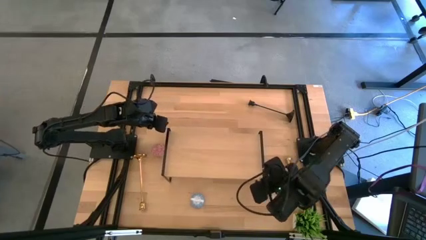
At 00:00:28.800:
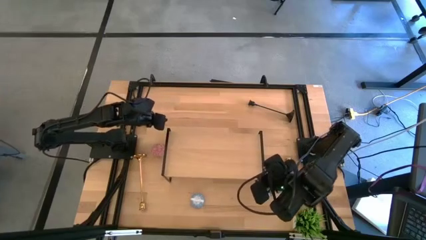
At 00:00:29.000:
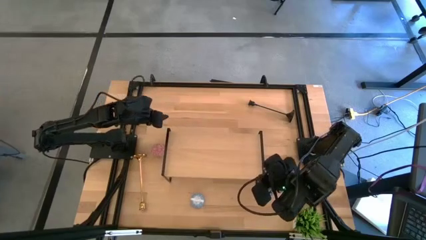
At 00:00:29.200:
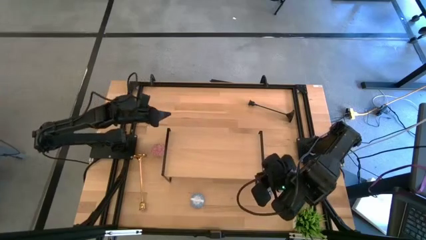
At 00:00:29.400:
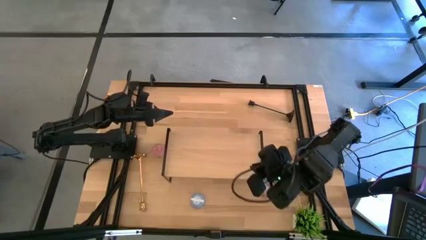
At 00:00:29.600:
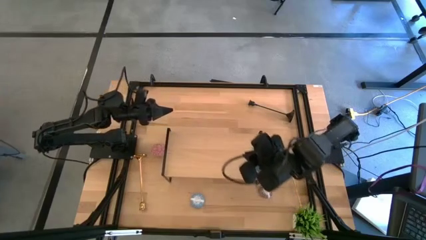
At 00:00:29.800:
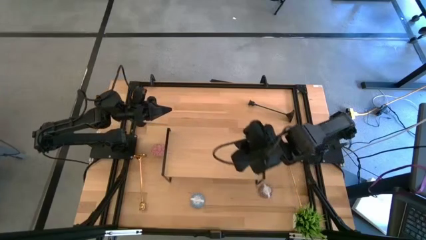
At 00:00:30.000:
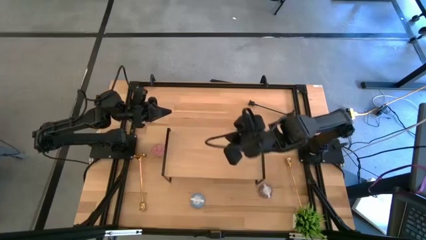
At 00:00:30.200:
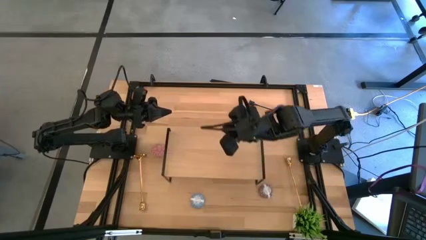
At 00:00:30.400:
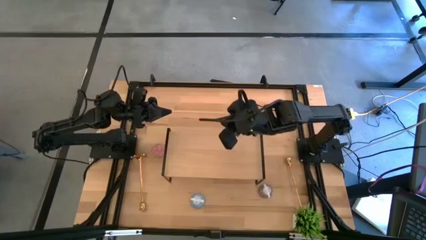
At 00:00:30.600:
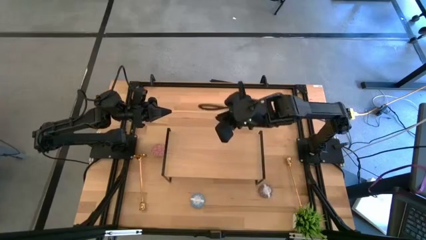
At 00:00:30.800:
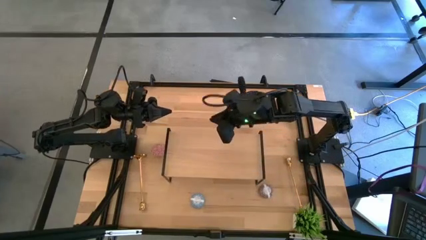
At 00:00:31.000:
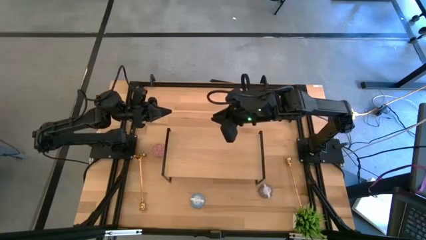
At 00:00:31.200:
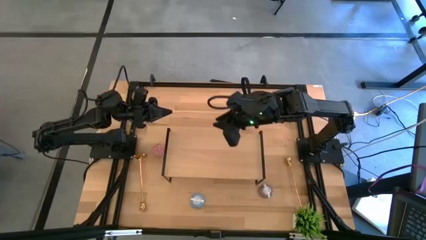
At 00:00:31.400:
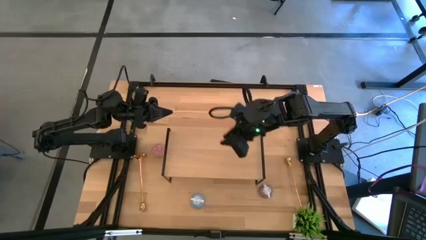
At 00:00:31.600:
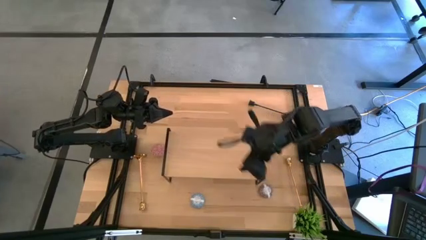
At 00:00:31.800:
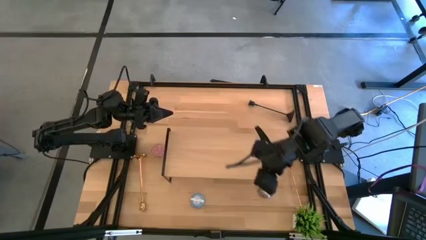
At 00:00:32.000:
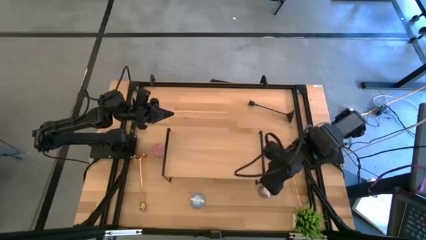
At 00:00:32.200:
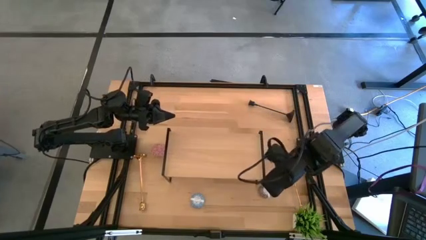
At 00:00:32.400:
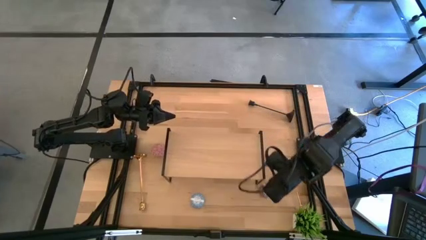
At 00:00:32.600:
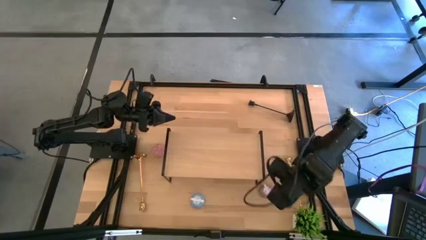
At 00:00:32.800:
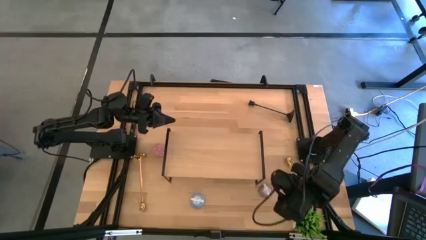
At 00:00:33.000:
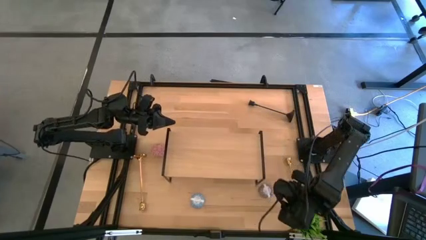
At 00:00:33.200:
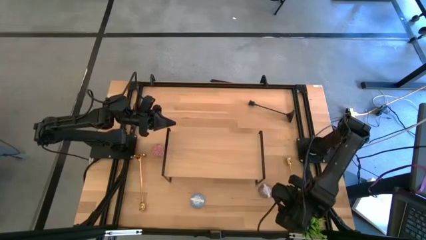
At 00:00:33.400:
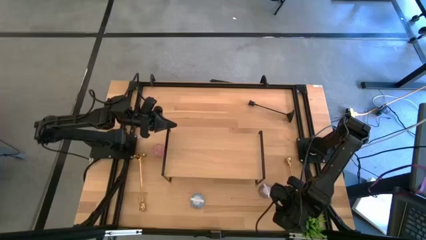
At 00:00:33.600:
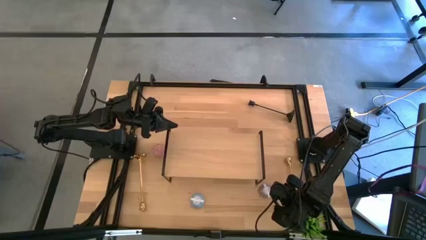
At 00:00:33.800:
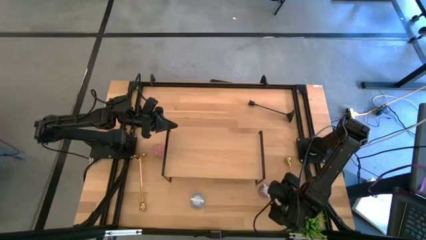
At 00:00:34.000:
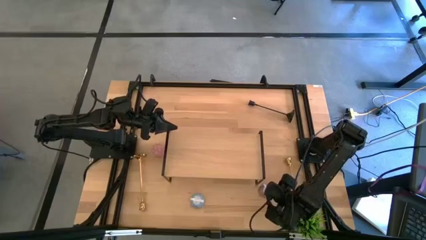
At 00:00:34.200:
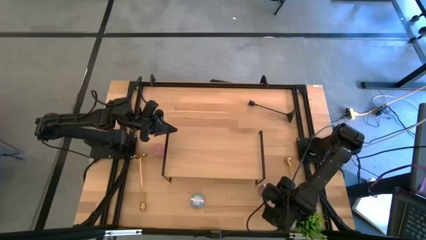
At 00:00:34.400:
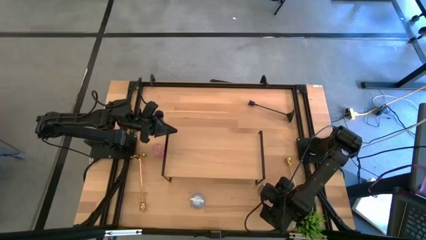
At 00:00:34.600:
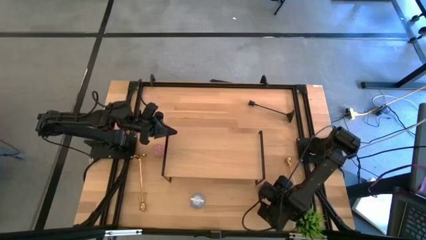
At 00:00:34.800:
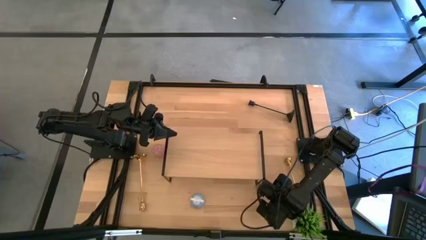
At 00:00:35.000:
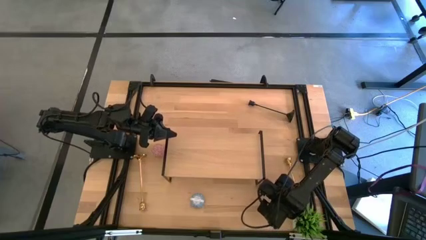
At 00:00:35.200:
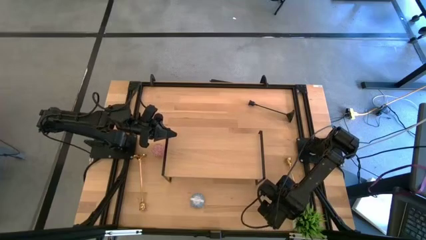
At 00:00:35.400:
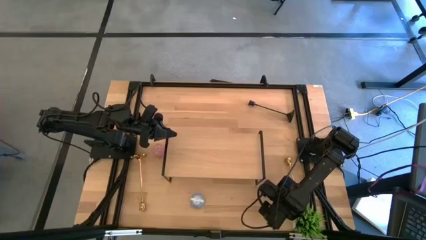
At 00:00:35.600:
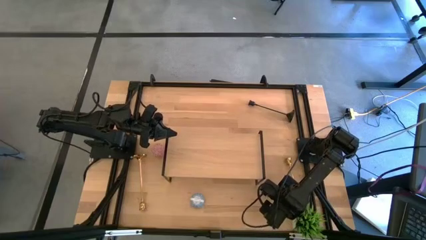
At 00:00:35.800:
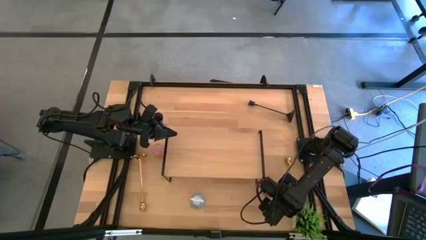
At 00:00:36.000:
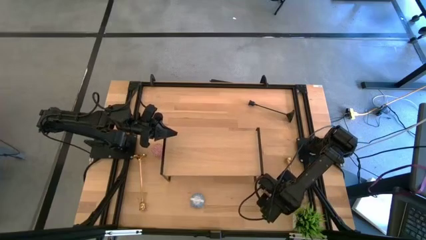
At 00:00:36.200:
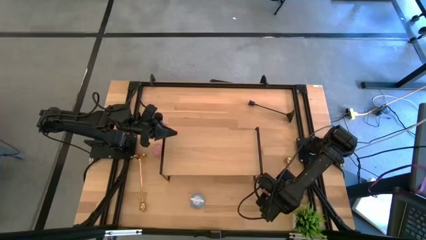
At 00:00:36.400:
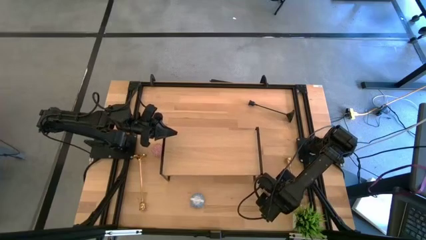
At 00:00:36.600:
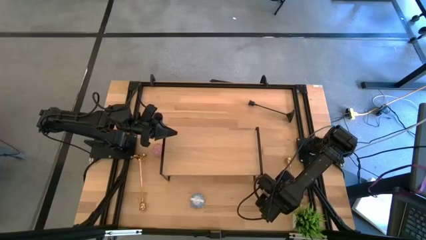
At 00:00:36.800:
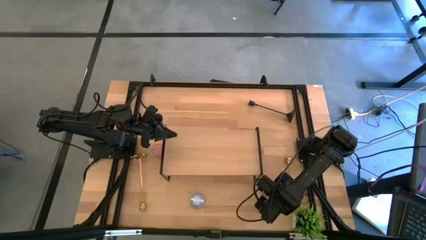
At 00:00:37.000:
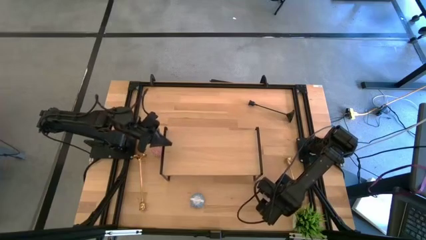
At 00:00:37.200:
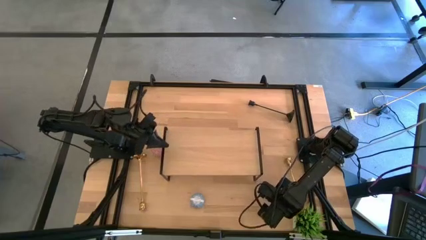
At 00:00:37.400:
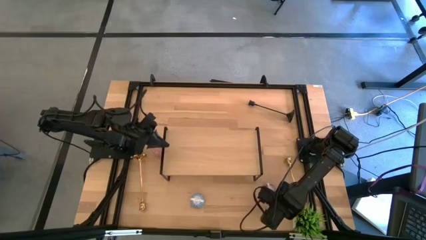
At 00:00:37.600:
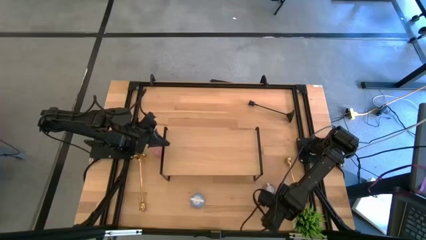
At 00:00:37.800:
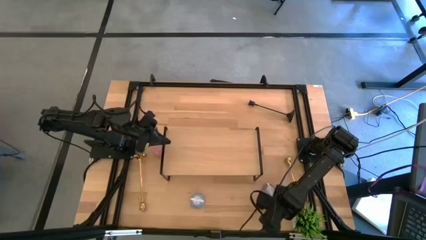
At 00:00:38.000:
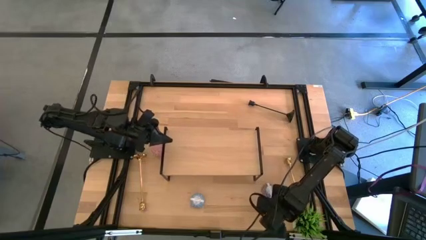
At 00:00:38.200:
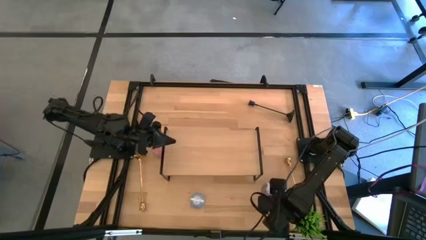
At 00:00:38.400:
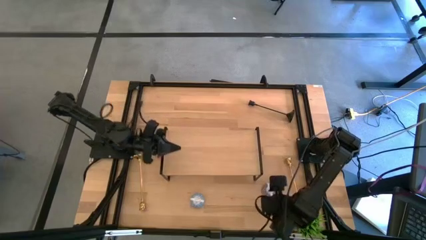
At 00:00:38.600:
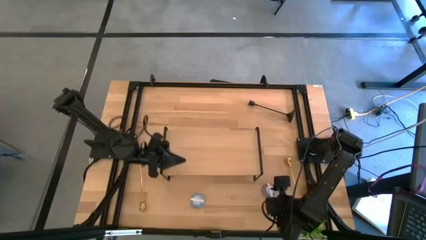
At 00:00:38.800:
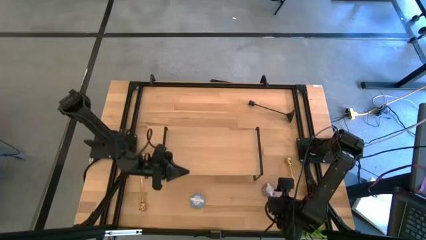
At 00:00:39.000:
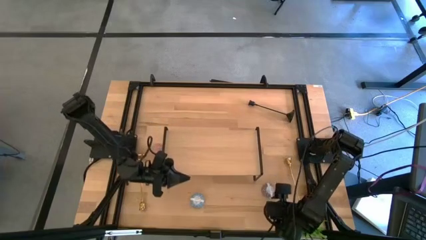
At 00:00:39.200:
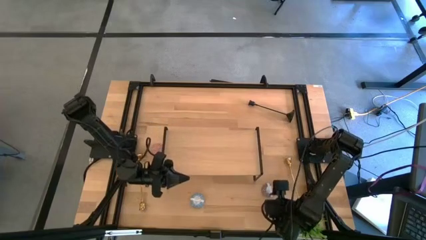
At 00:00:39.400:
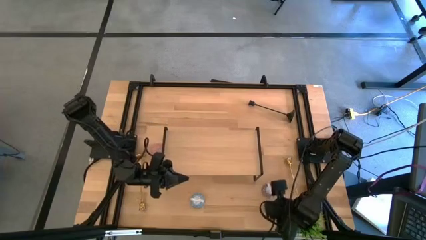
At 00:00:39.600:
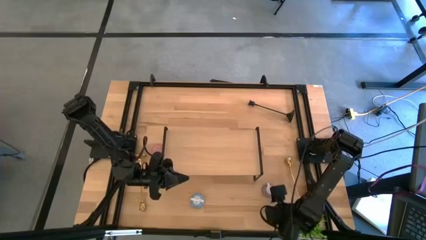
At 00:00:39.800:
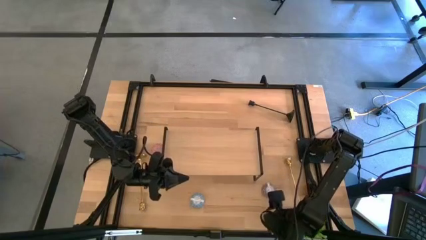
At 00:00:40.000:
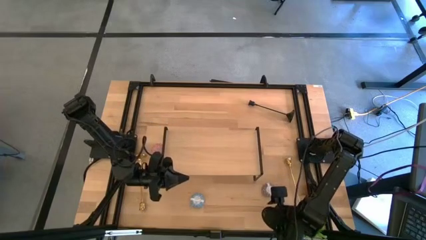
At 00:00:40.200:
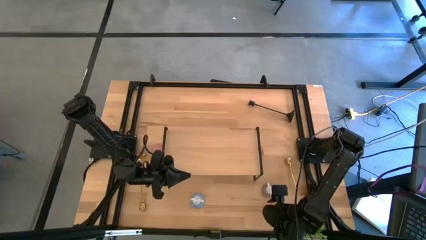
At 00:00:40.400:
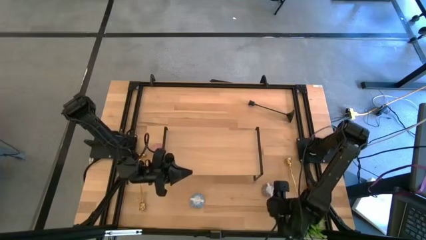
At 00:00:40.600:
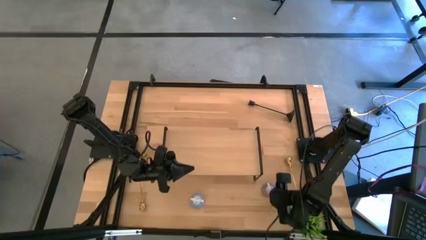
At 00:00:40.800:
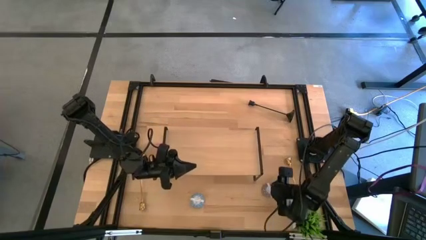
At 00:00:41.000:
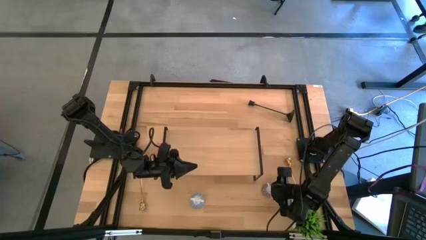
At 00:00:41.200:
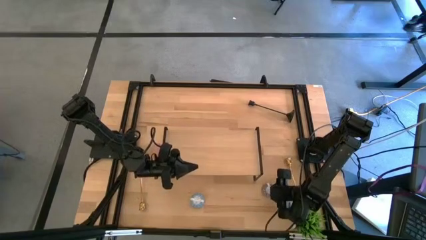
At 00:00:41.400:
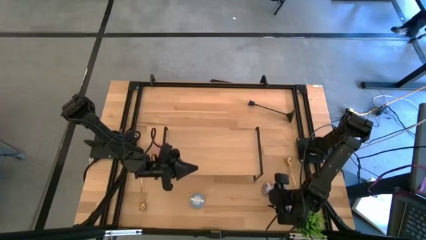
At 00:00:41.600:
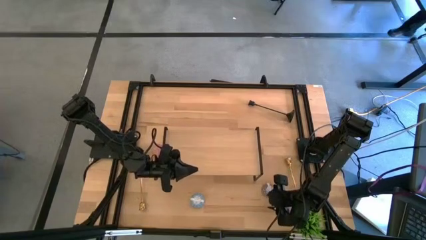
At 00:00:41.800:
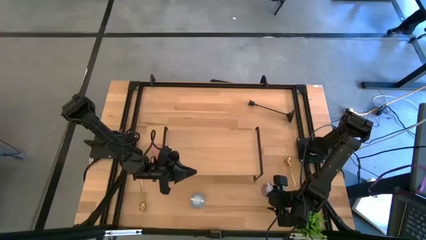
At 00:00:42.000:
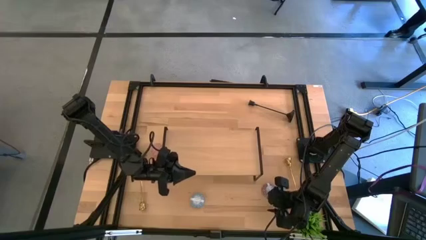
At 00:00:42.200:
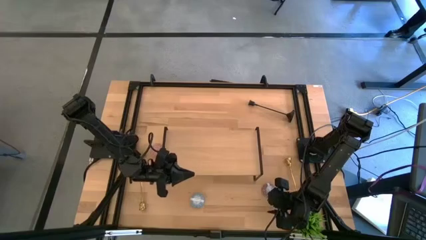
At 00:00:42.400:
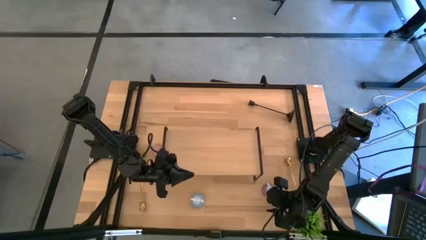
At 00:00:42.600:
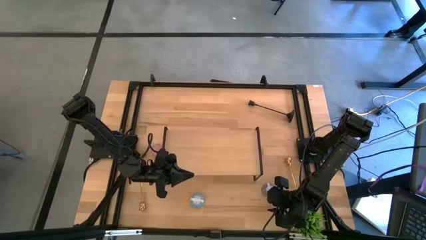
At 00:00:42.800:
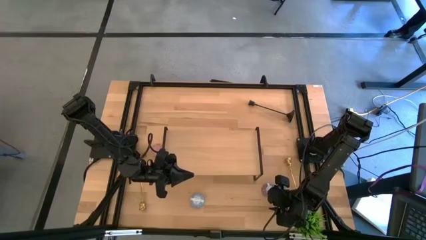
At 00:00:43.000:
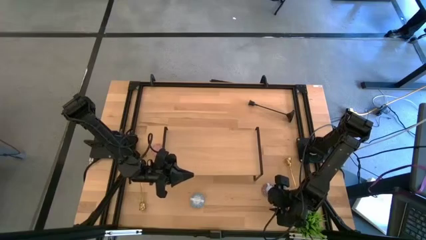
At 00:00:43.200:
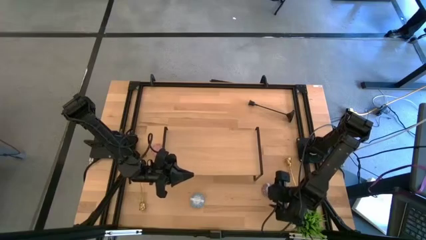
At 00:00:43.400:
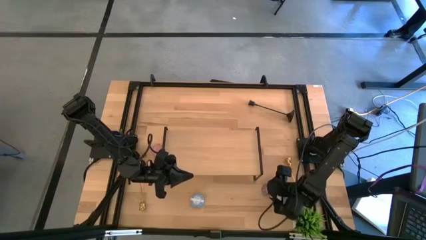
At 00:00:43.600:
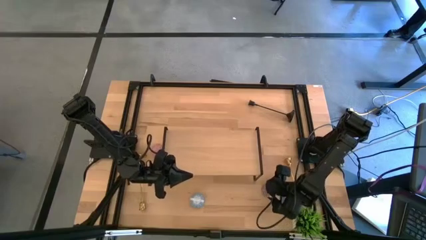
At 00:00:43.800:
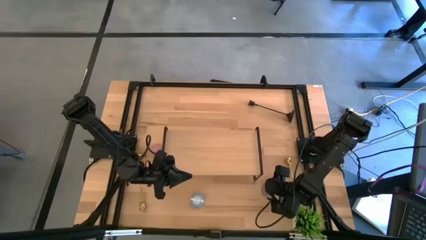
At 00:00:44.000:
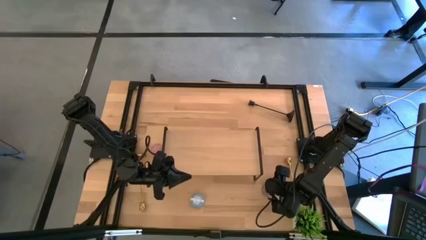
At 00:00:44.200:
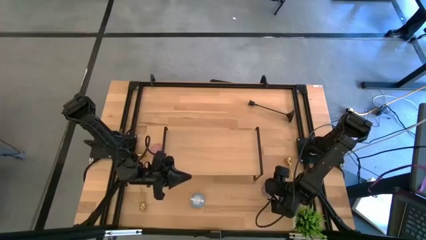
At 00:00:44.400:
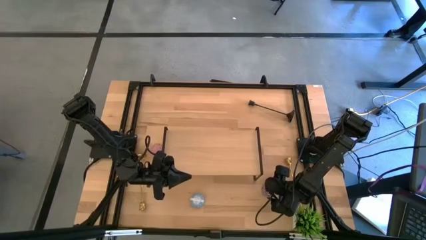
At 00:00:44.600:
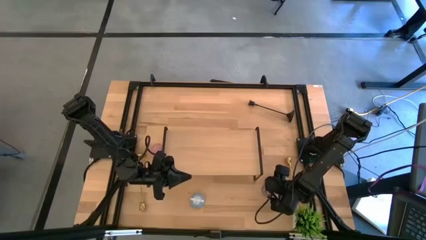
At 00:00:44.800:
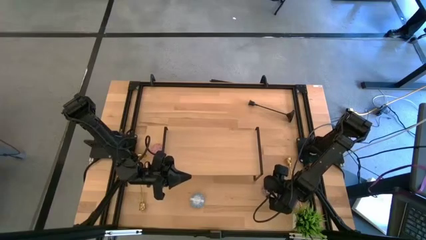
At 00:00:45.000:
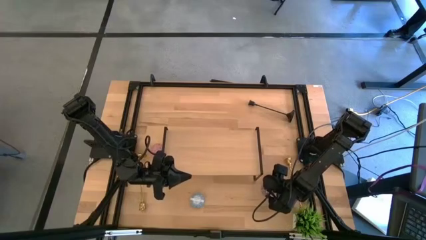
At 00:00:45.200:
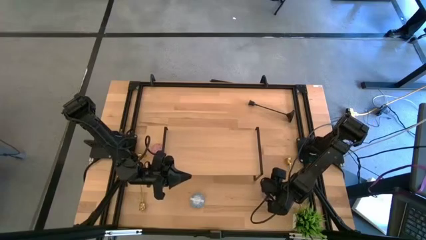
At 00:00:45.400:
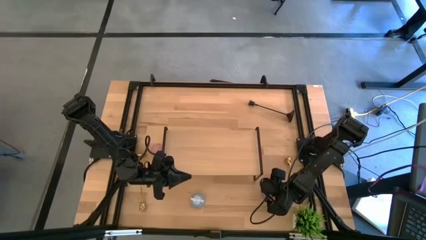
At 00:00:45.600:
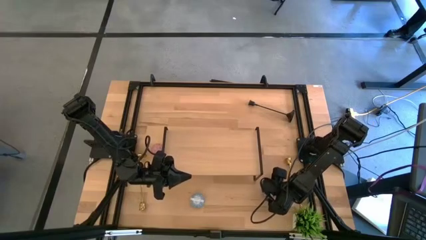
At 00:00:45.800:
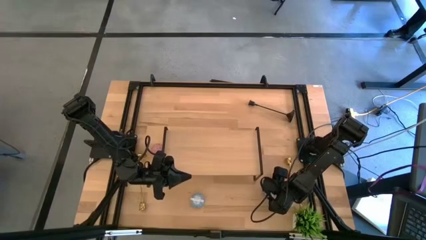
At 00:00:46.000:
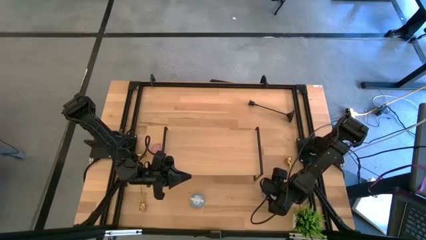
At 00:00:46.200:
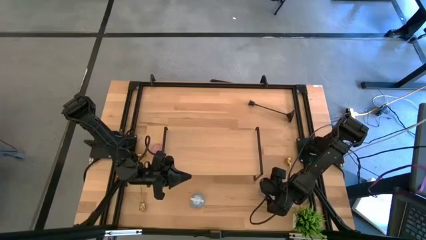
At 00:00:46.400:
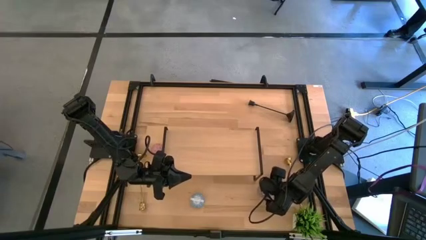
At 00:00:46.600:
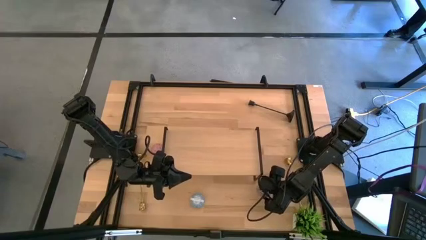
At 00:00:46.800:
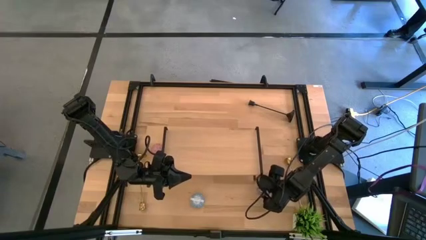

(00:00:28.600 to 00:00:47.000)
Task: Pick & Place candle stick holders
Put the red scented candle on the shelf
